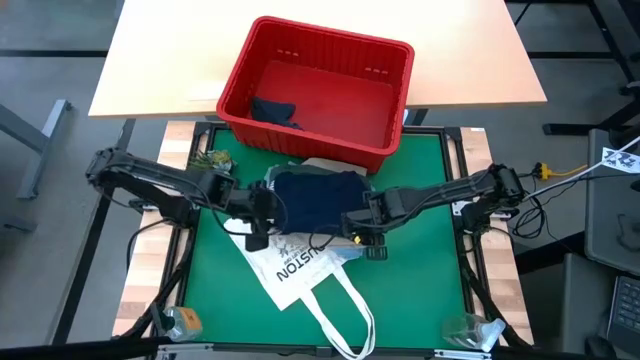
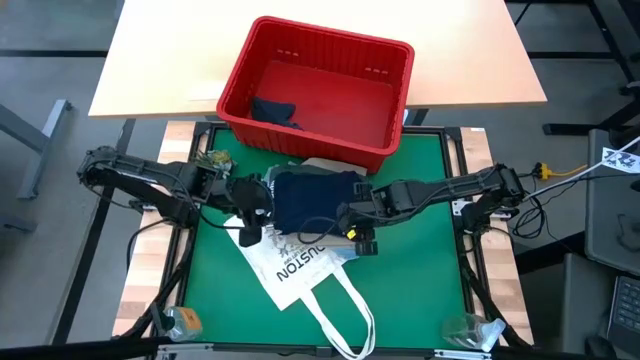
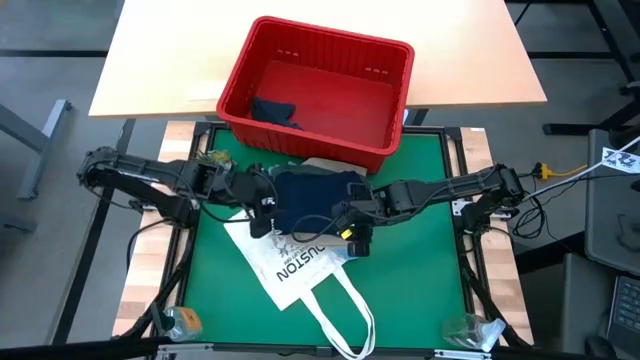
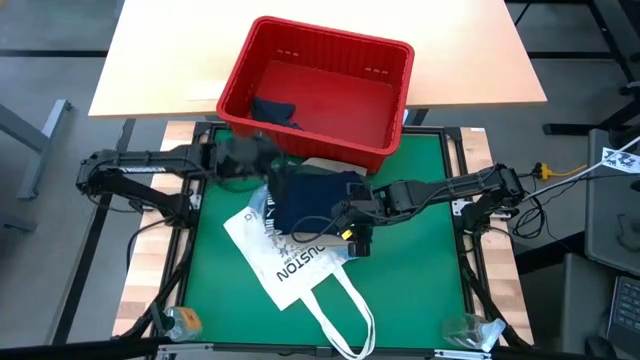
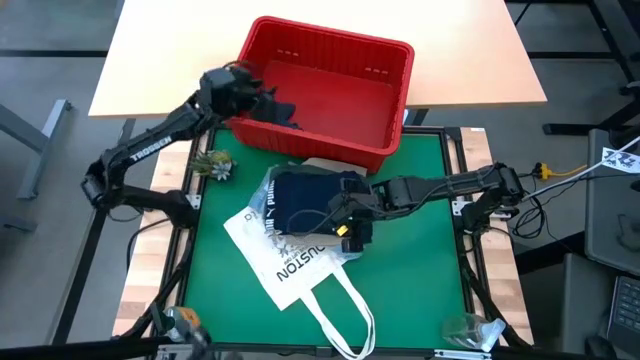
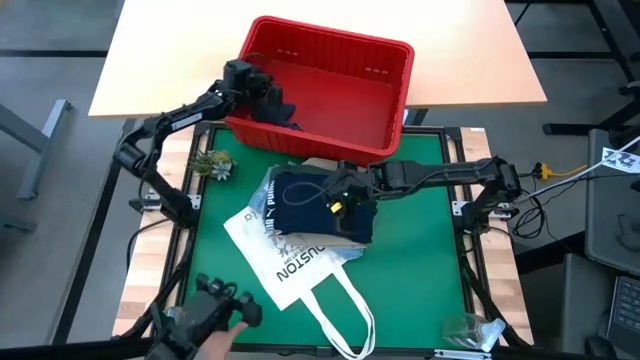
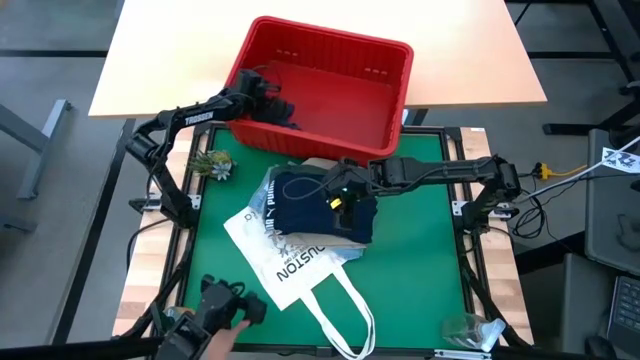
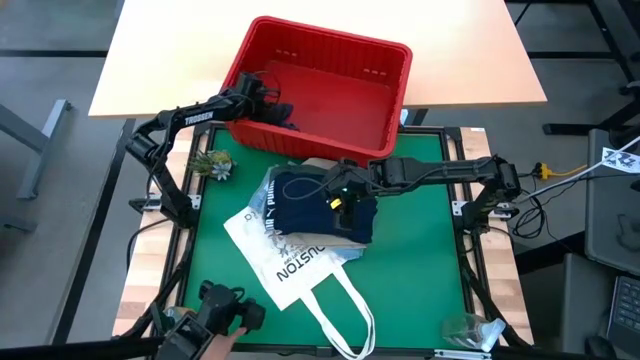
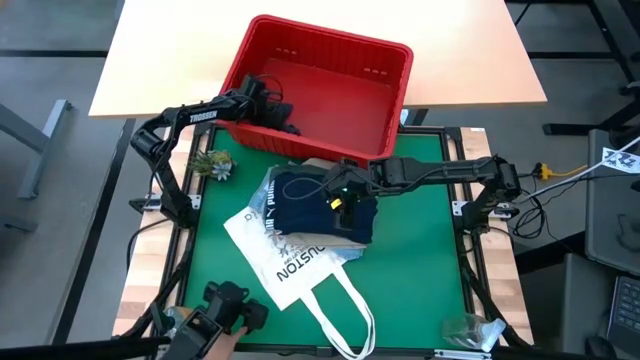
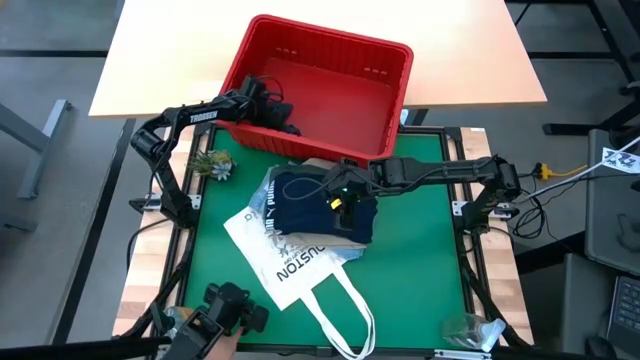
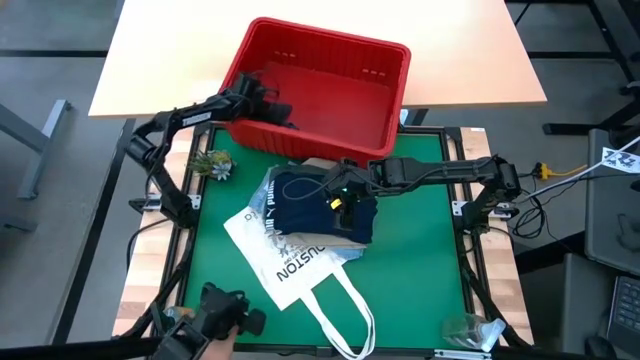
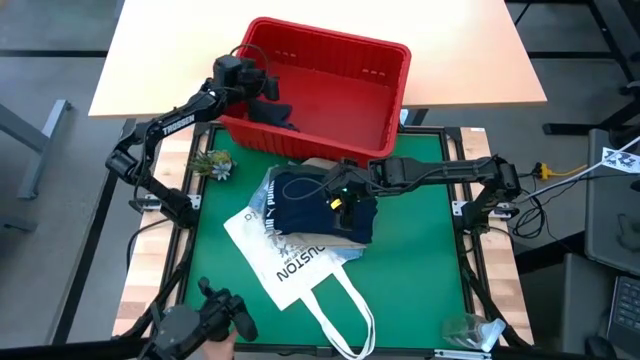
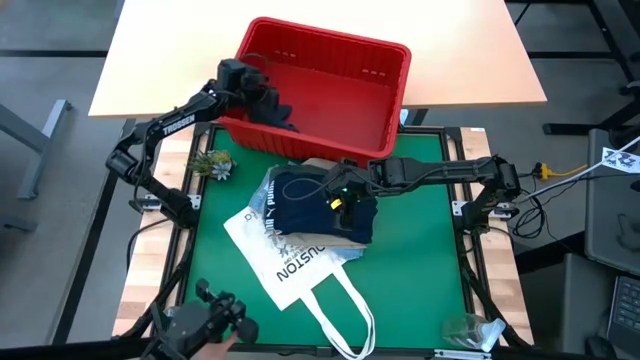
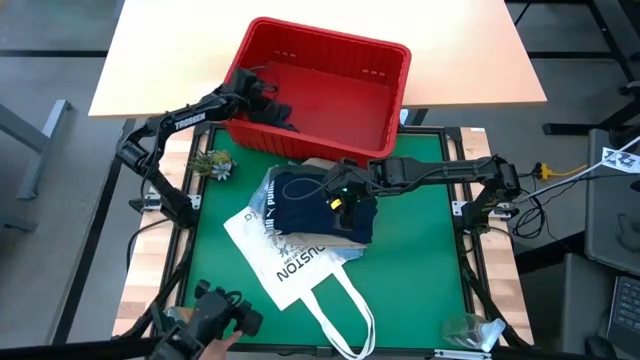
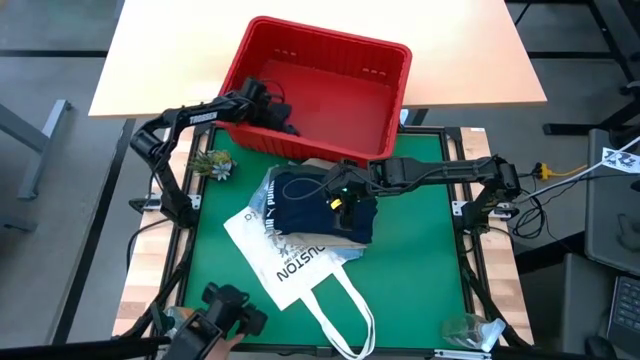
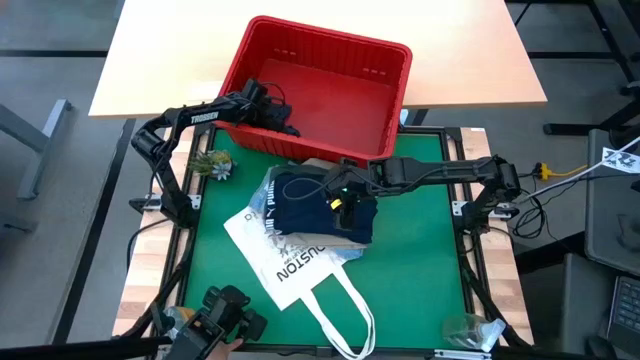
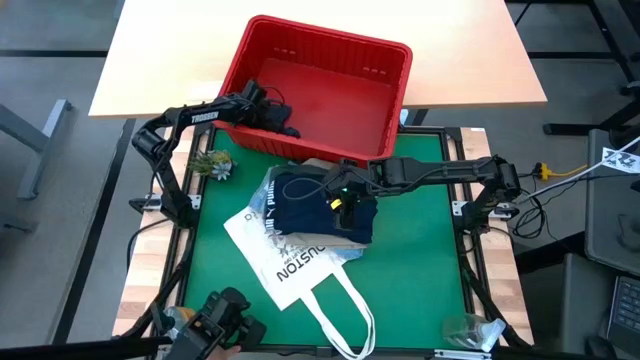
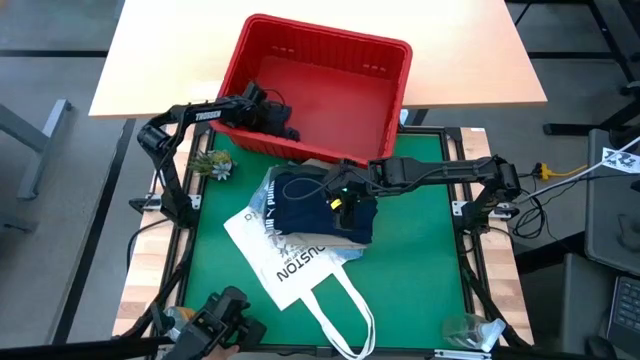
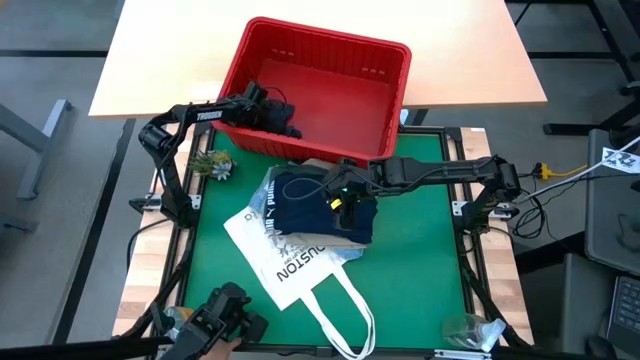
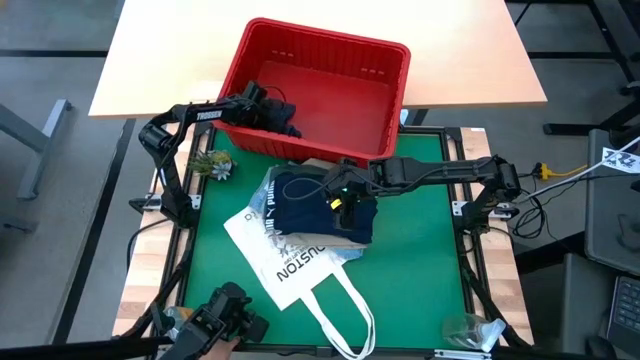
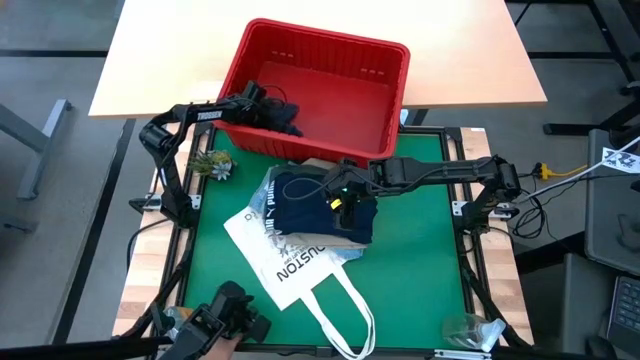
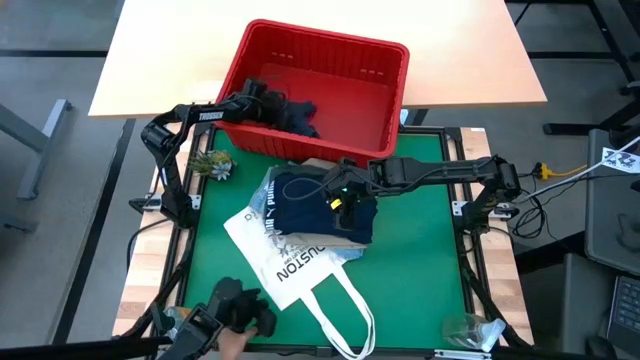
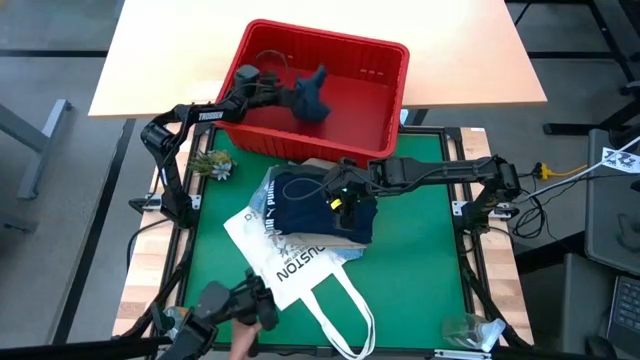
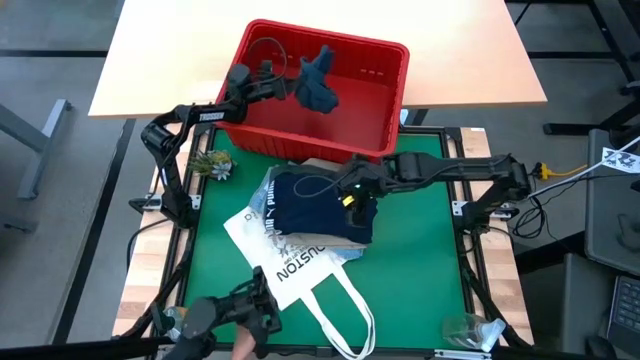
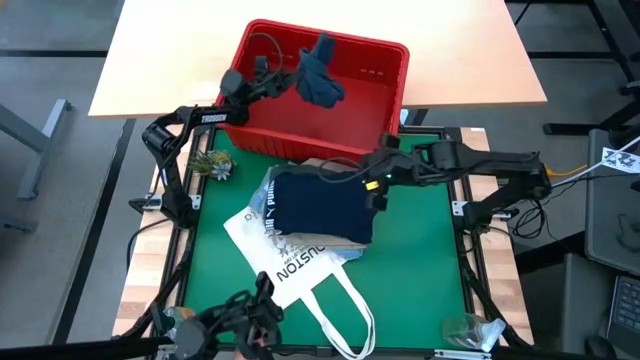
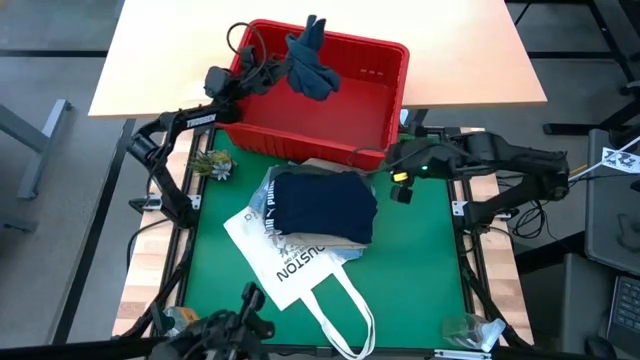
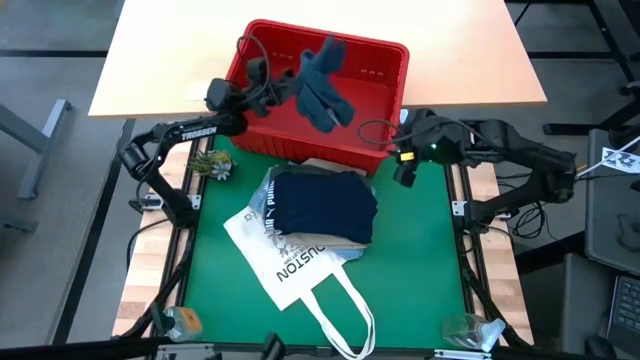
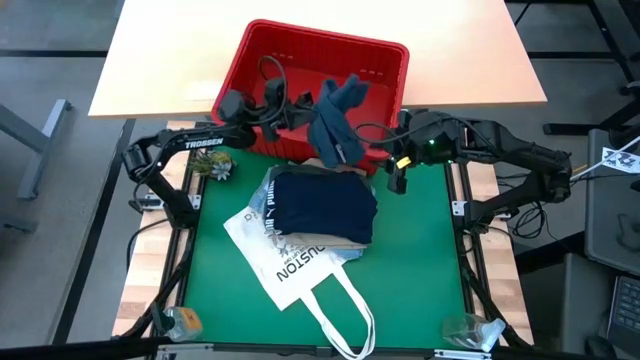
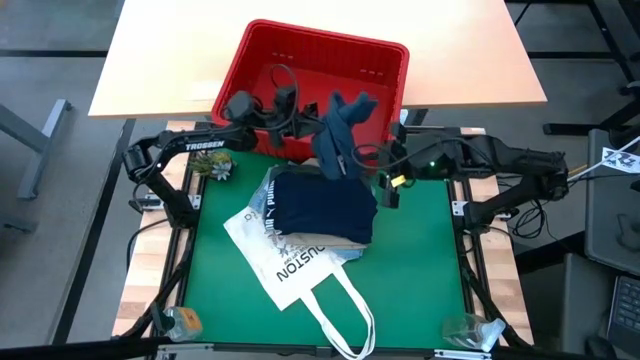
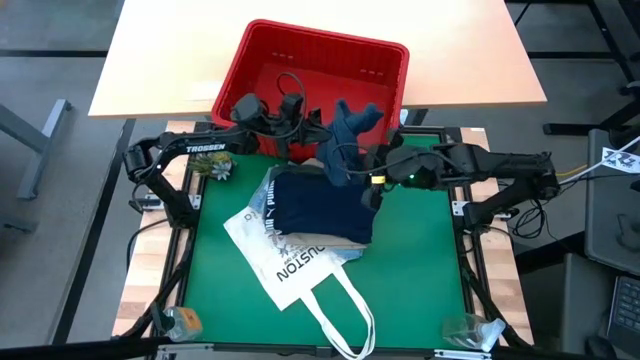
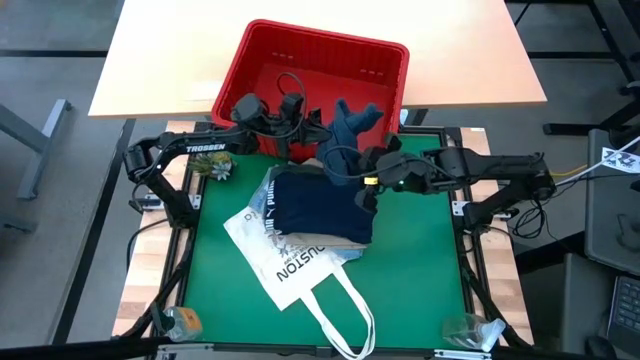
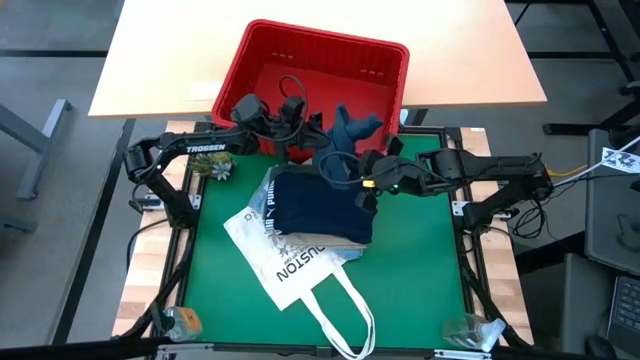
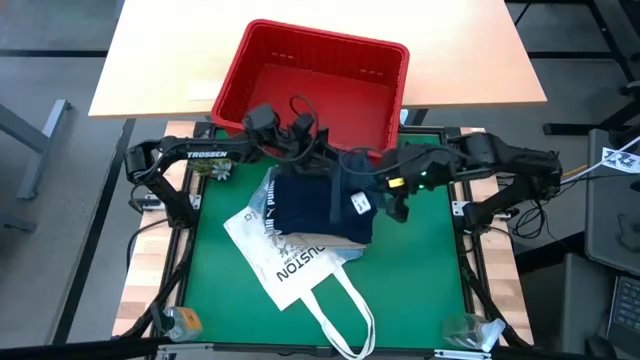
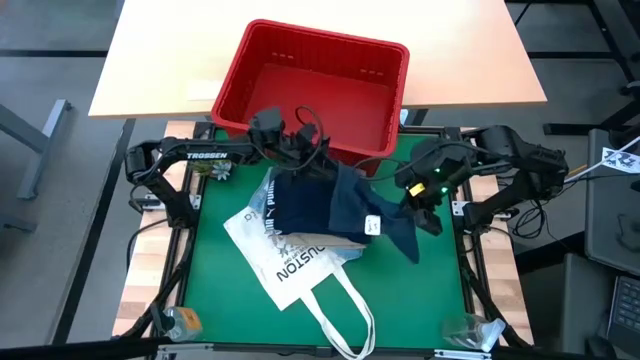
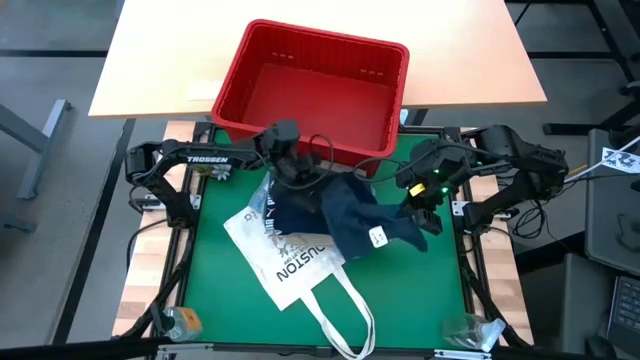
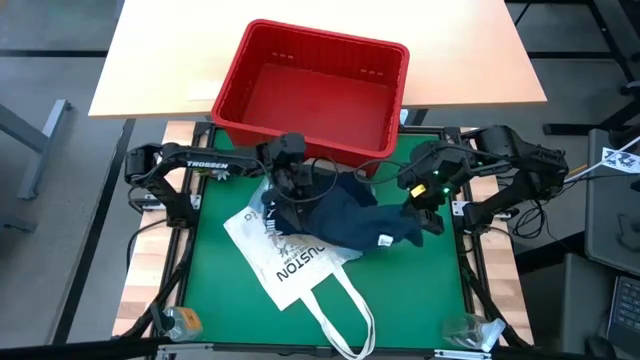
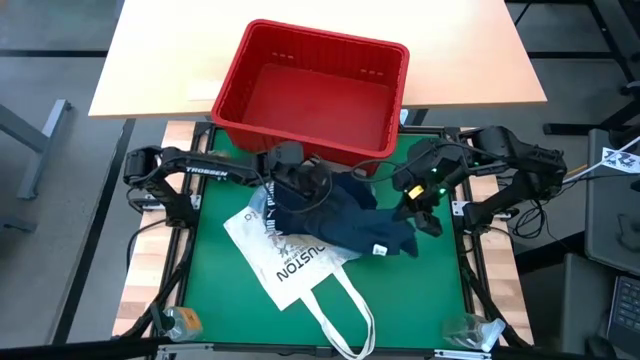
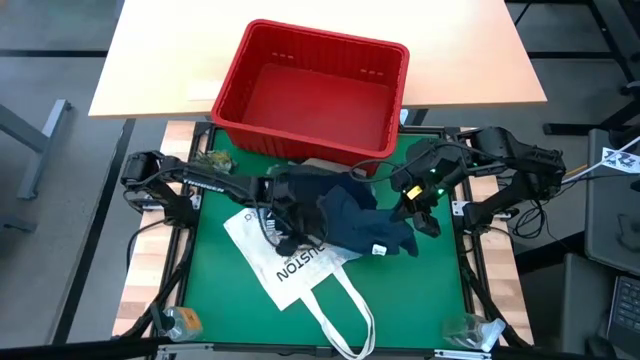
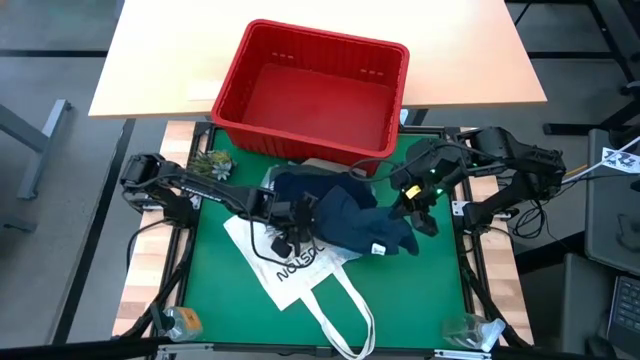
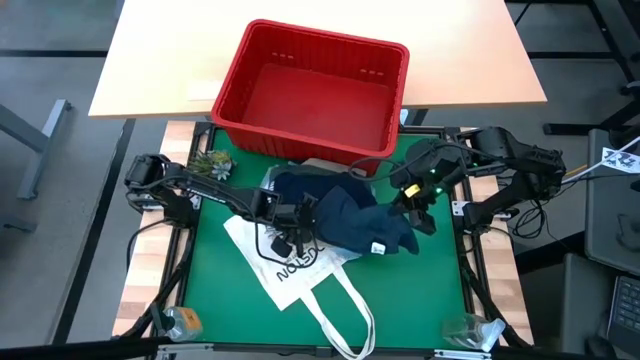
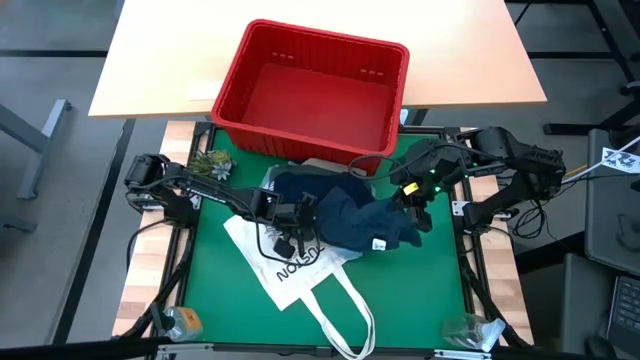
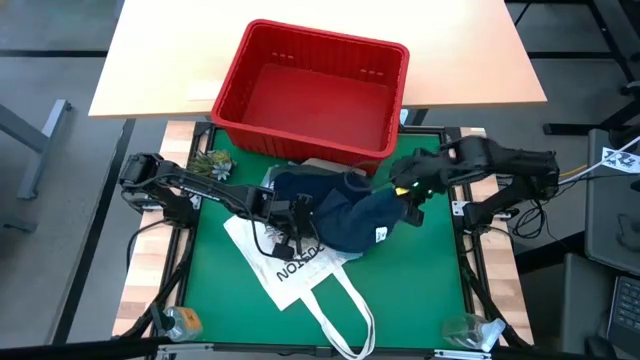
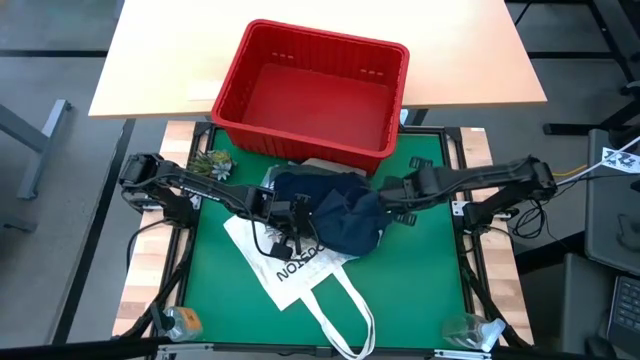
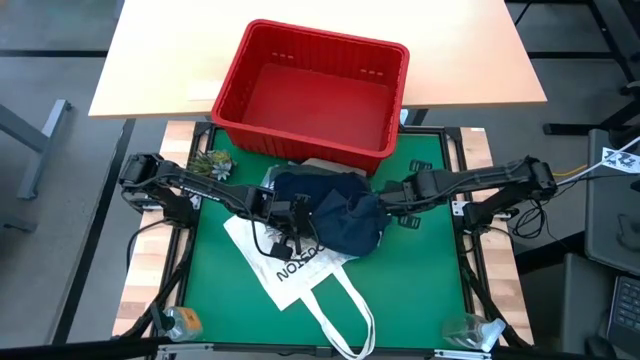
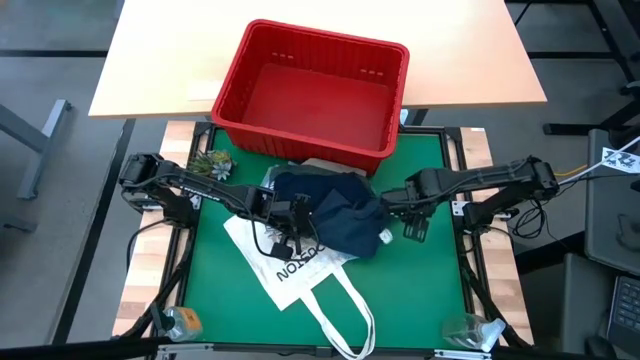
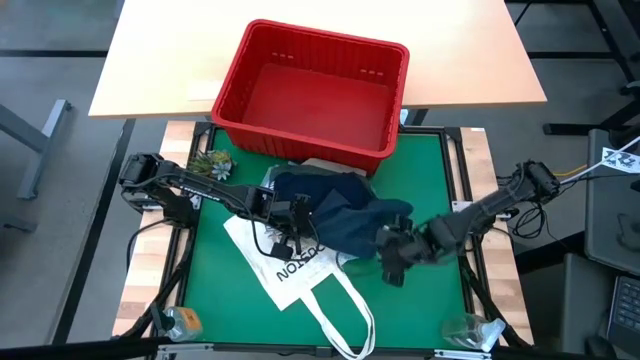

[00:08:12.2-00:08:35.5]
Task: Fold Laundry from Bin
Fold the gray shorts
